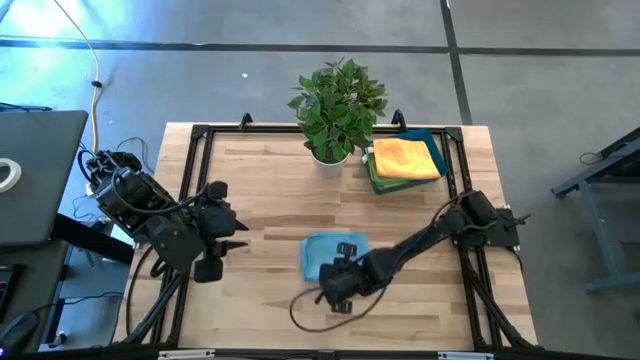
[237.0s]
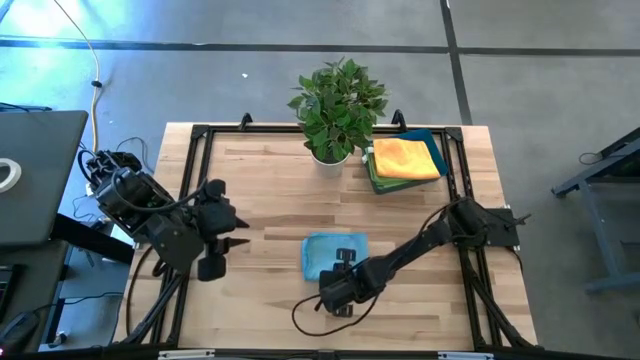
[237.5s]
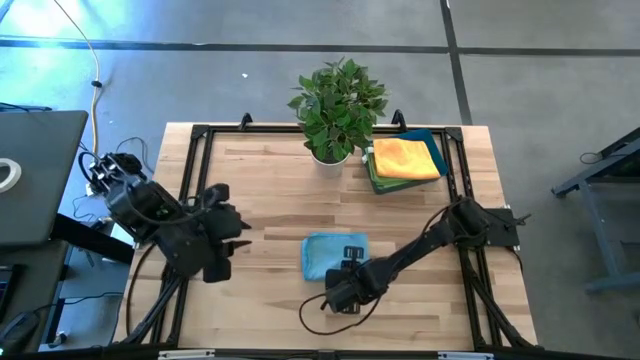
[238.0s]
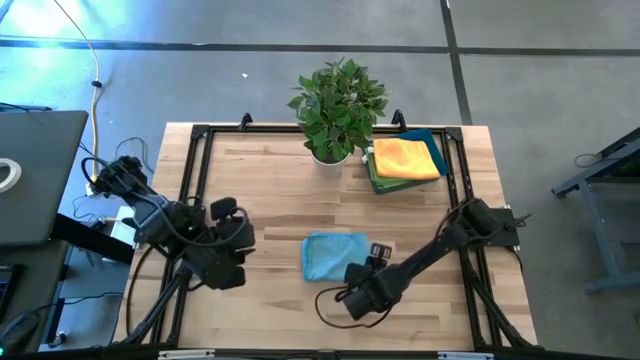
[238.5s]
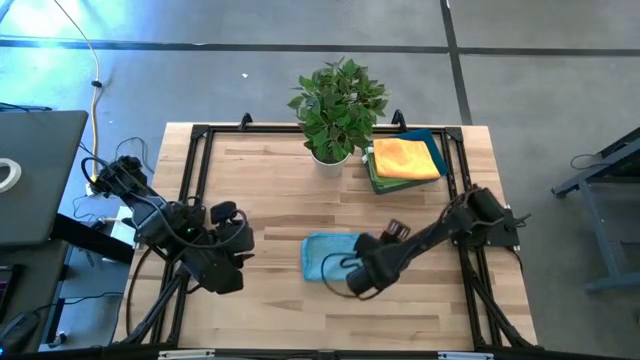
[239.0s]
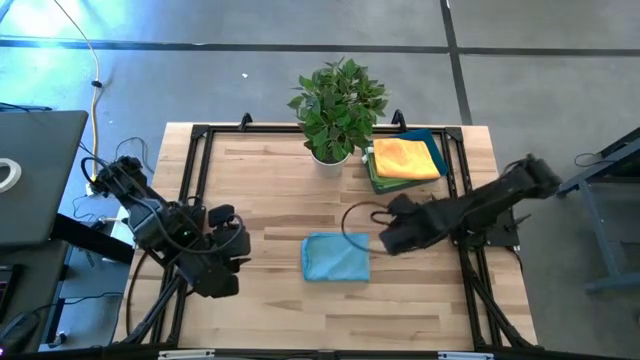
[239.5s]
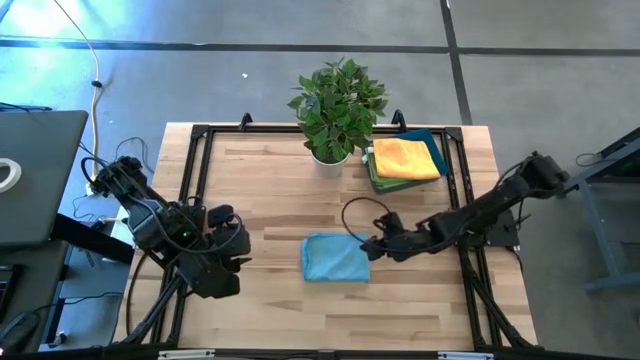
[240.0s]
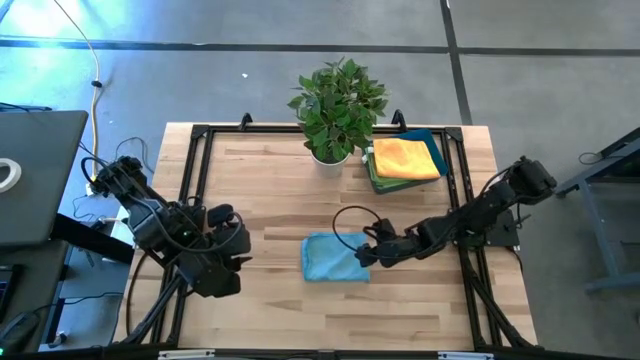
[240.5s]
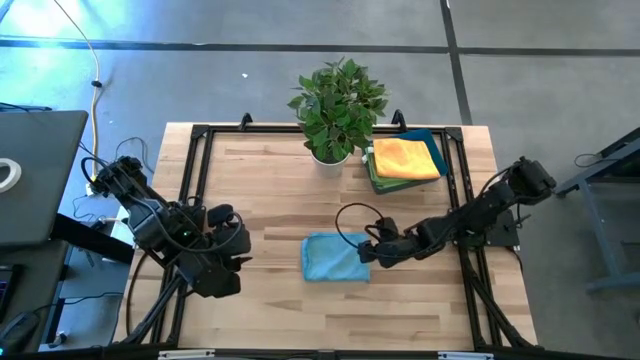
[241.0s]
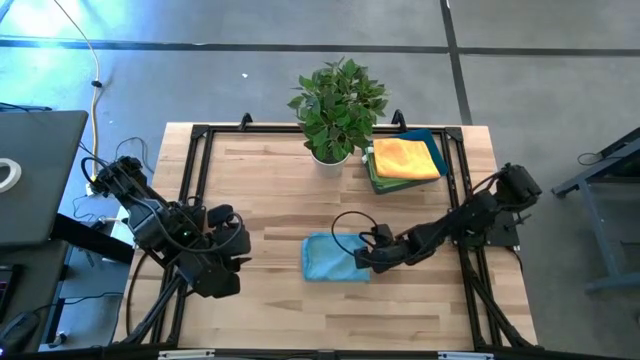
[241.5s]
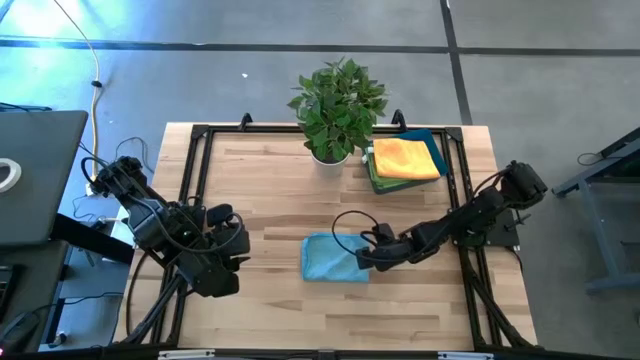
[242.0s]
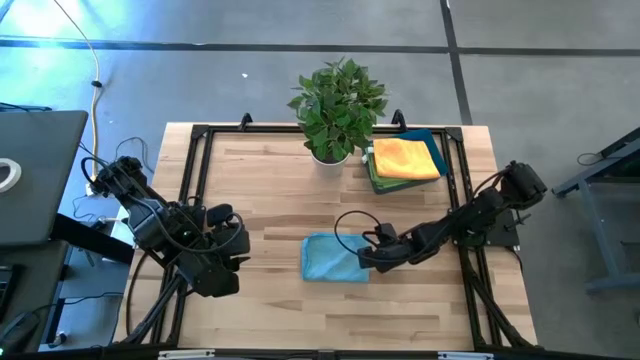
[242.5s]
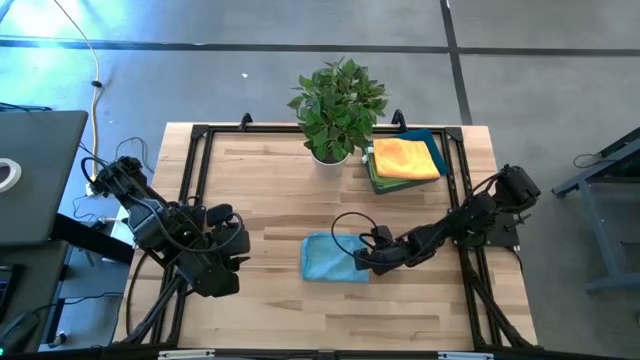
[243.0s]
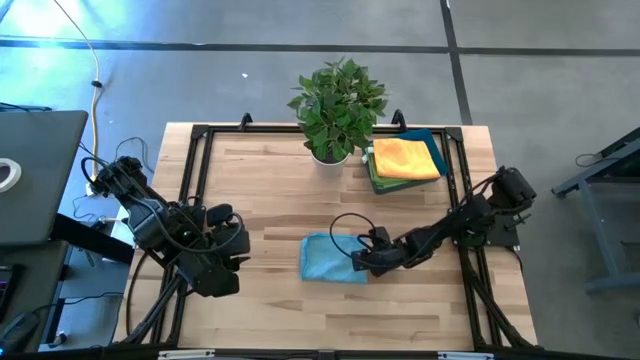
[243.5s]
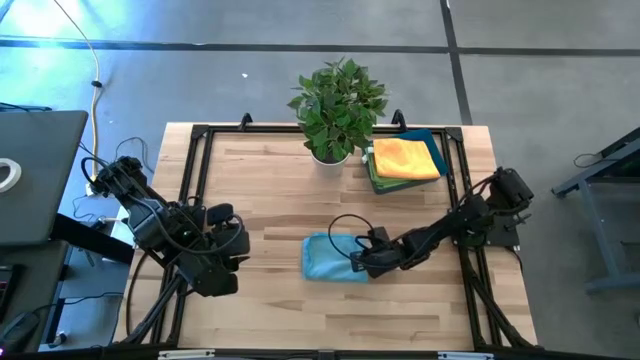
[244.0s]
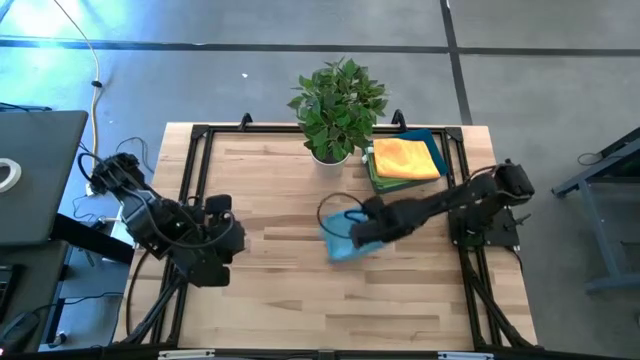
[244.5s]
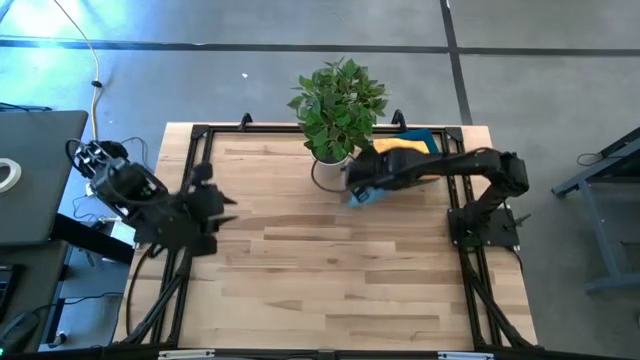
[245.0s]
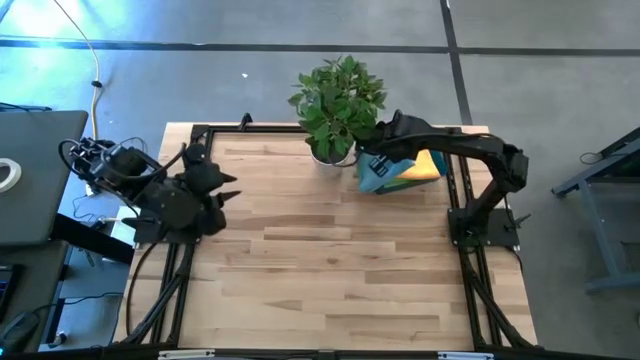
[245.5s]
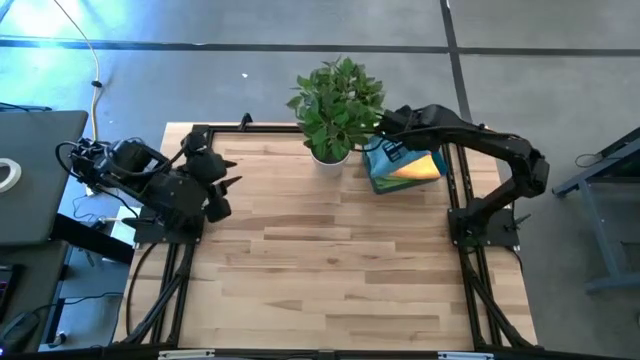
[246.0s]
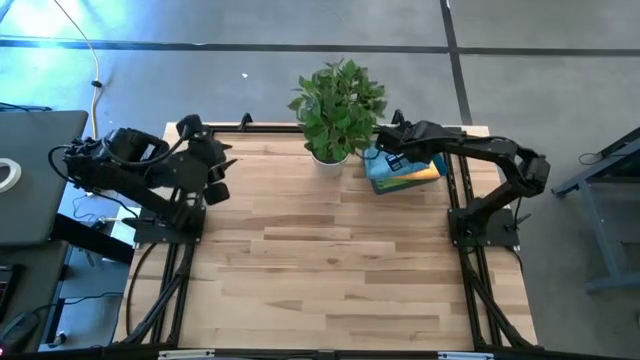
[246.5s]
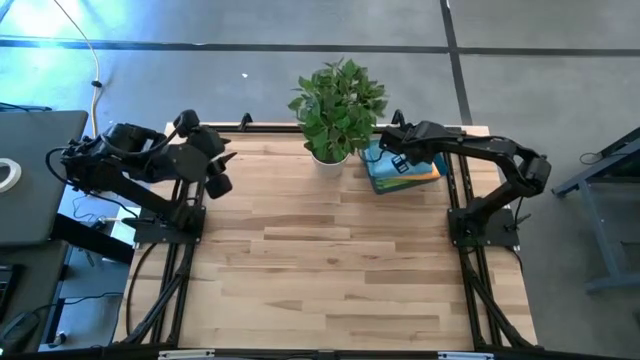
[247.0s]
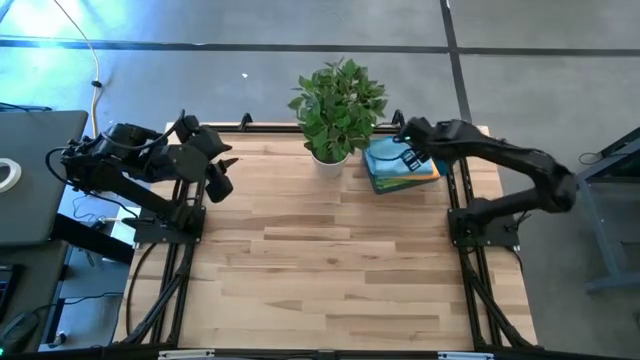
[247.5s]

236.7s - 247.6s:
Task: Sort microfiber towel by color & place in baskets
Stack the blue towel on top of the orange towel into the blue bin

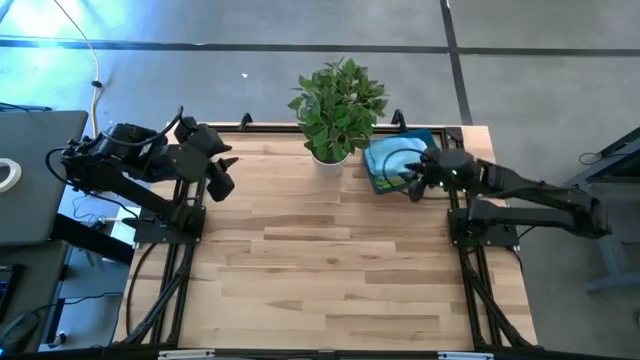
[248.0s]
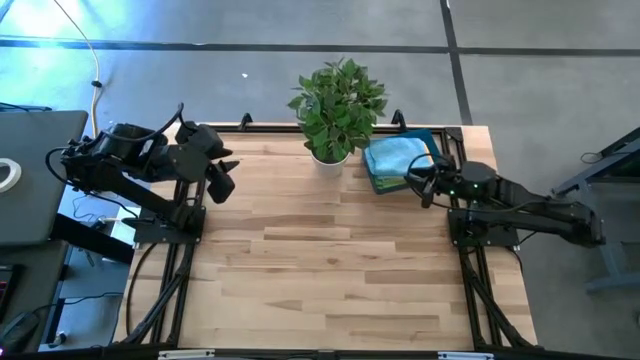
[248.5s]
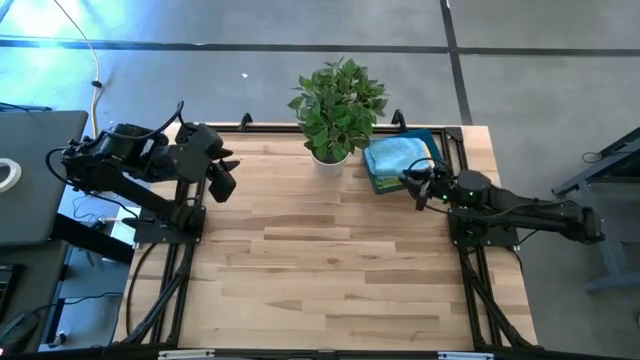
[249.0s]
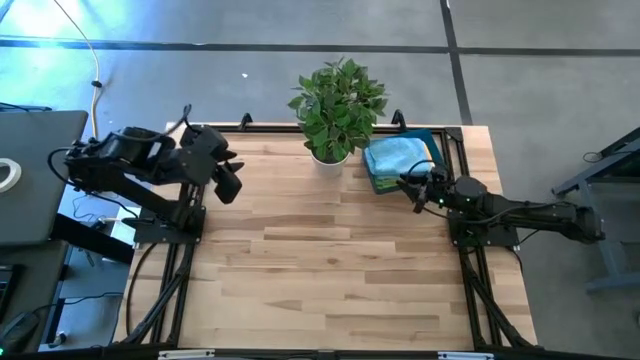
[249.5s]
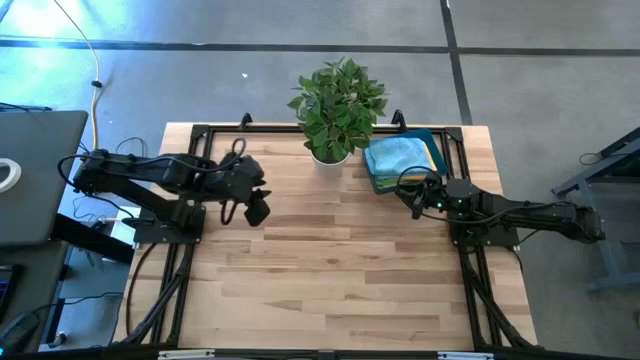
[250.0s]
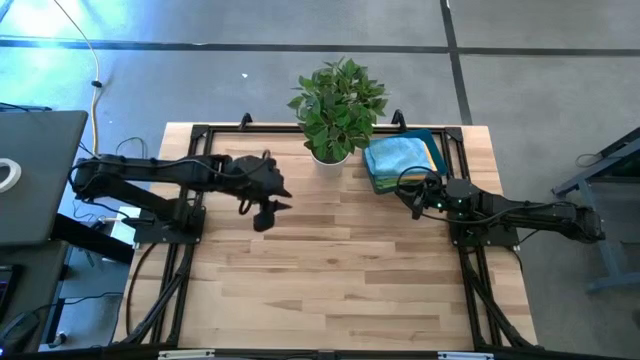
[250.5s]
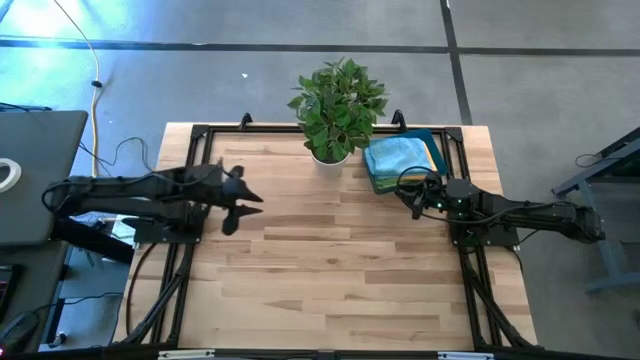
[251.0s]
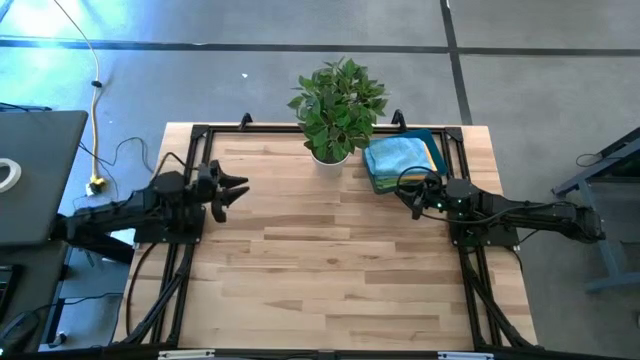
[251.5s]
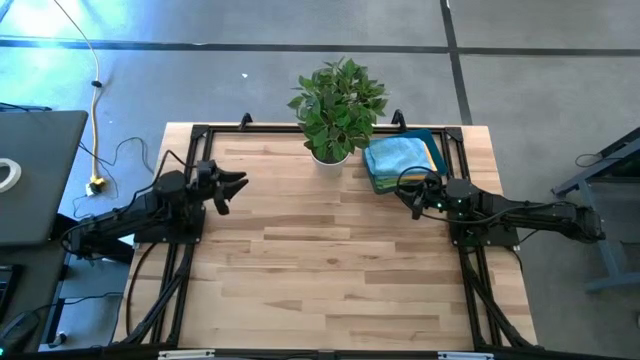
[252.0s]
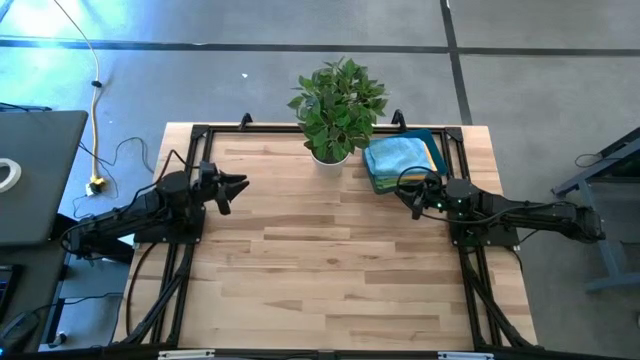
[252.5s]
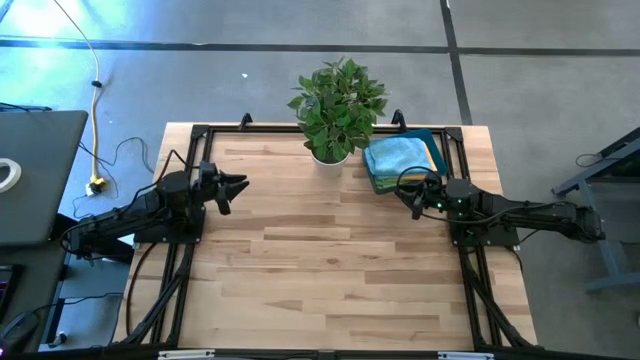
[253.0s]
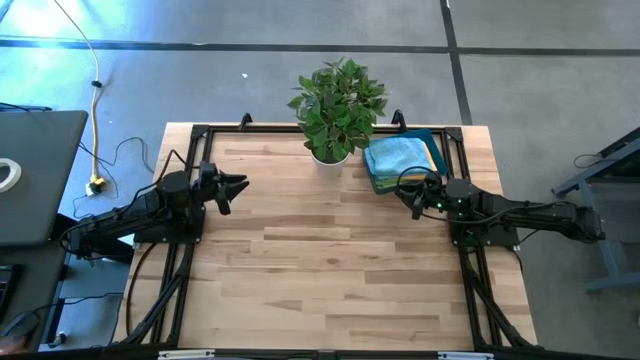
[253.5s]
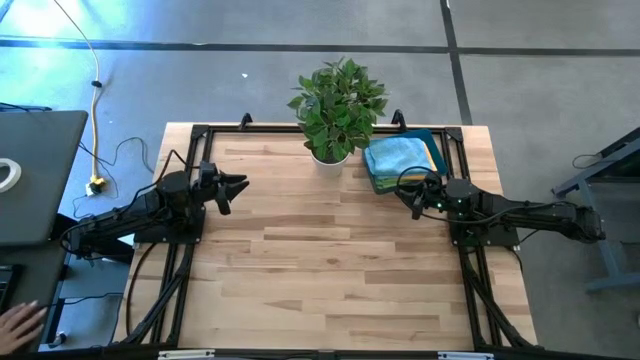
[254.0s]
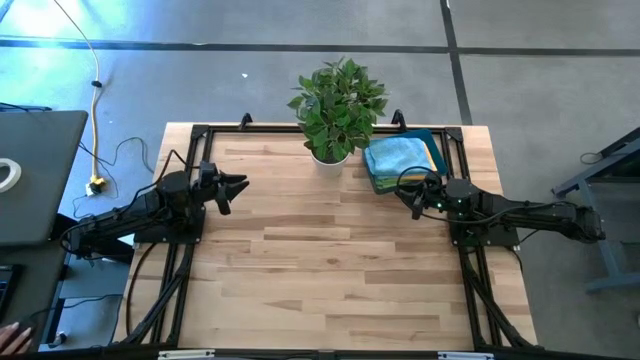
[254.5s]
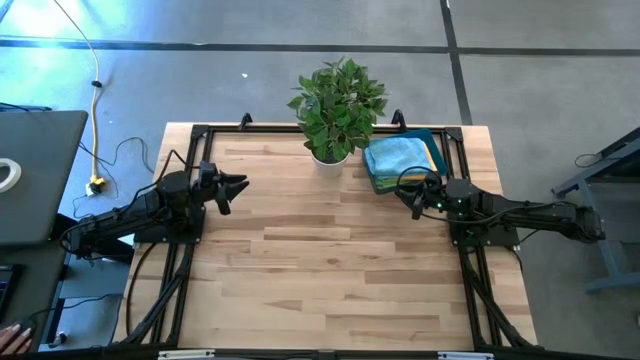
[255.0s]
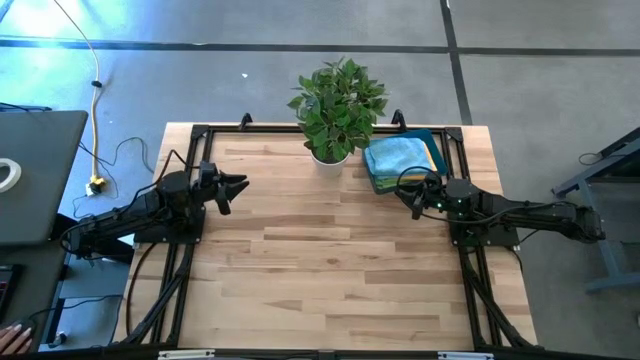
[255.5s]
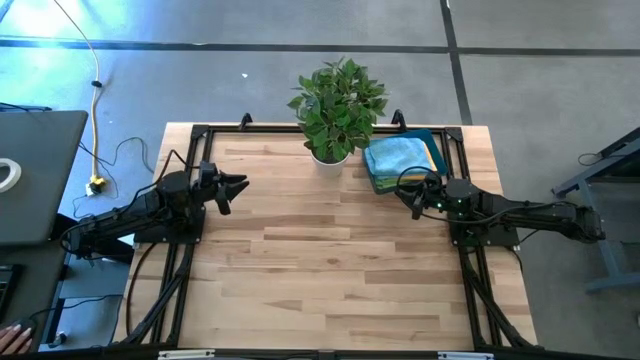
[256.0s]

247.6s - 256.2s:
Return to Home Position

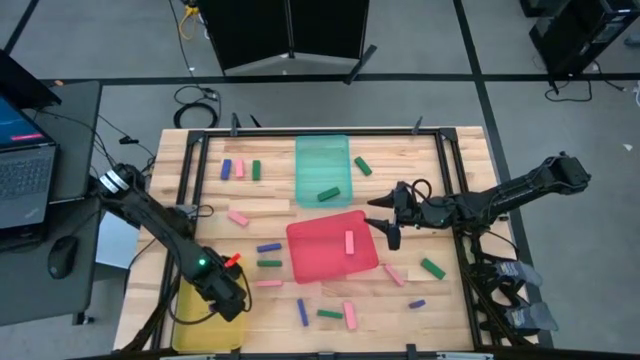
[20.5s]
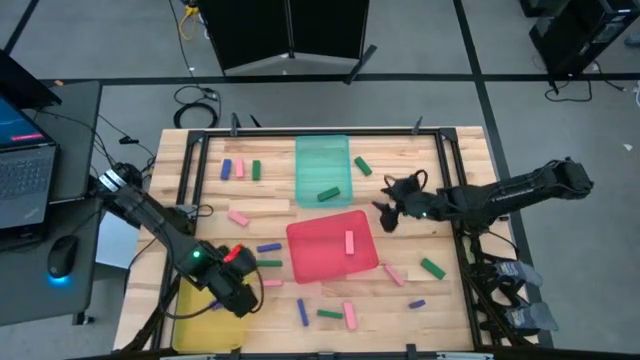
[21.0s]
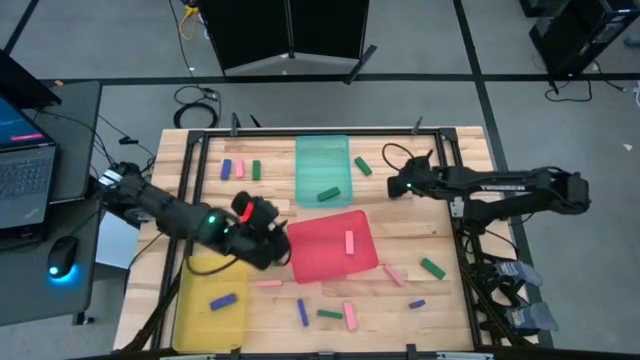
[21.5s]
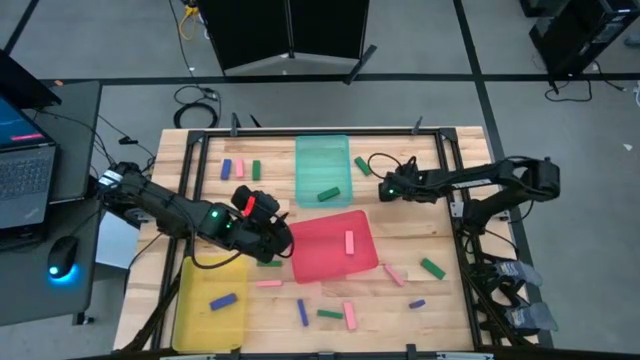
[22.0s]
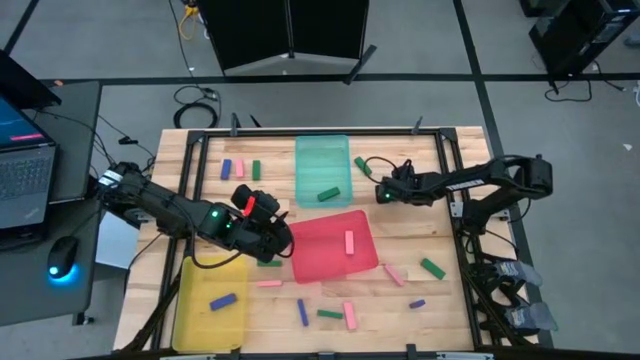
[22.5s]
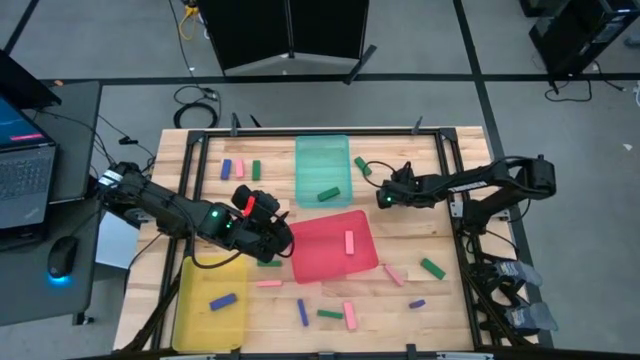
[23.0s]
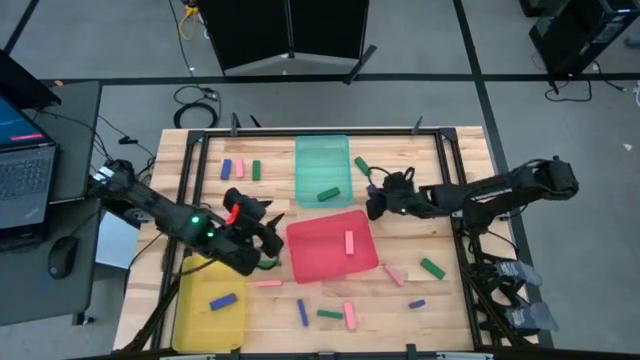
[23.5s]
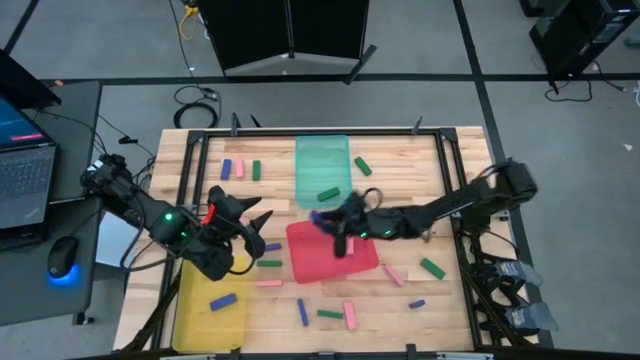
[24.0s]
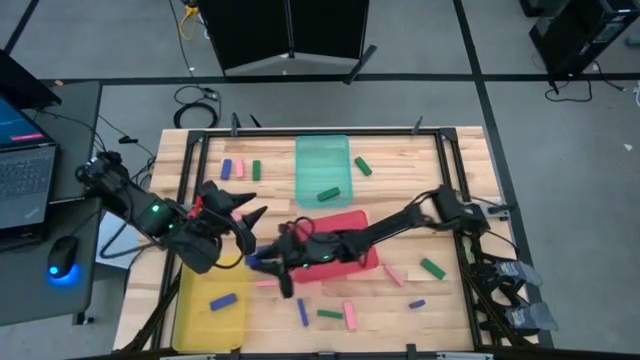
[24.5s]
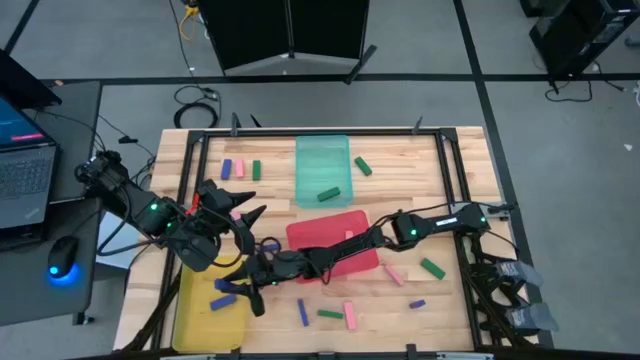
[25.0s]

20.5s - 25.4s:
Task: Sort blocks
Put the blue block into the yellow bin
